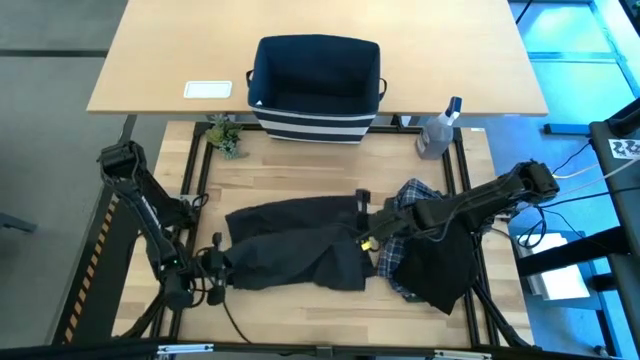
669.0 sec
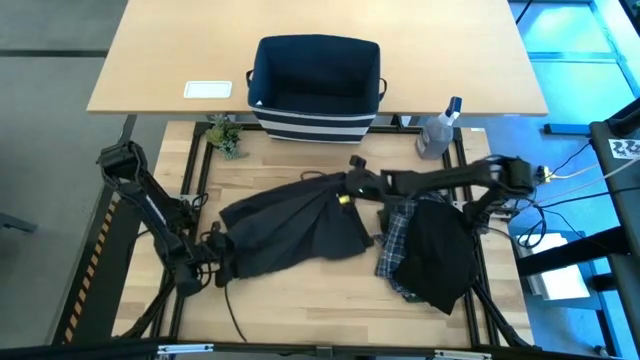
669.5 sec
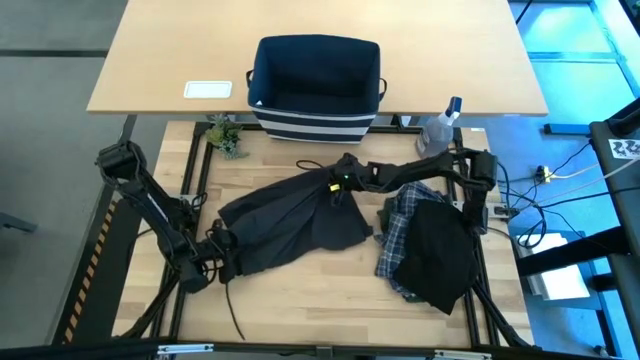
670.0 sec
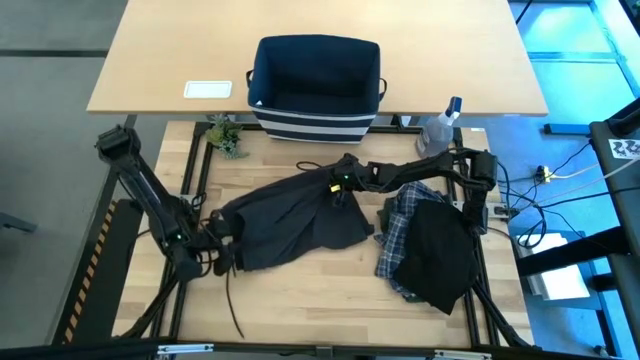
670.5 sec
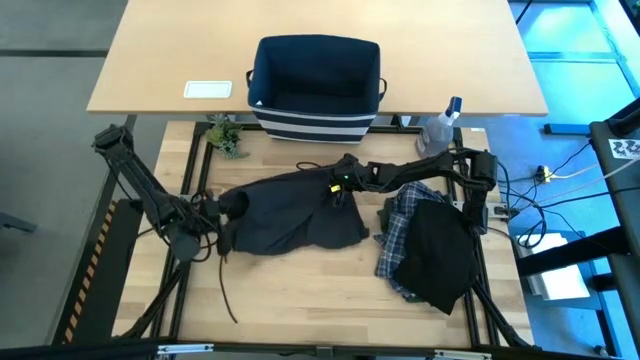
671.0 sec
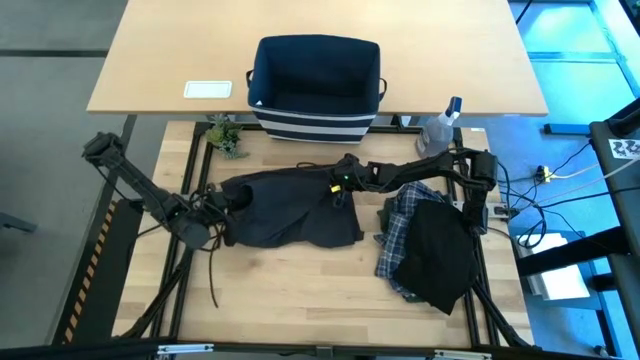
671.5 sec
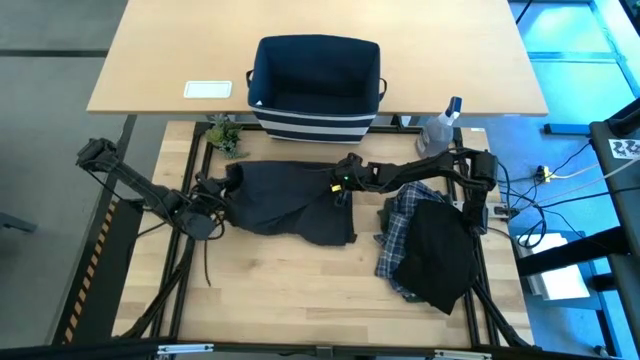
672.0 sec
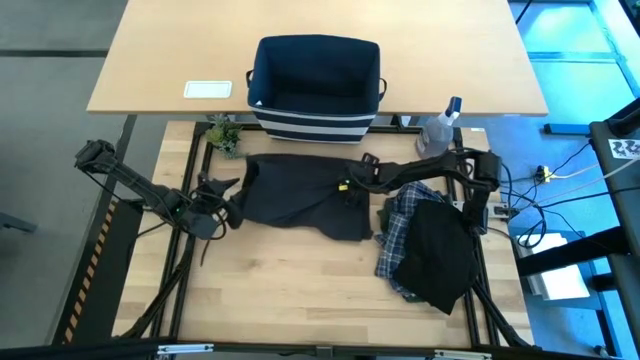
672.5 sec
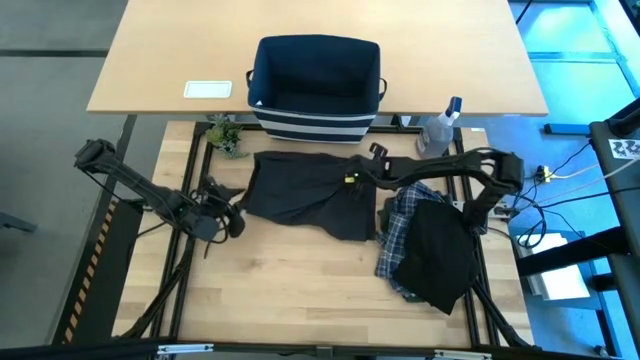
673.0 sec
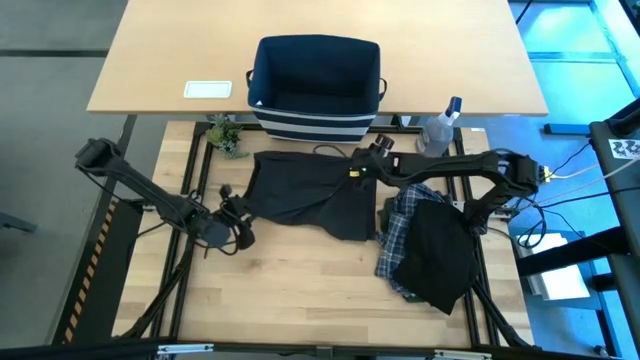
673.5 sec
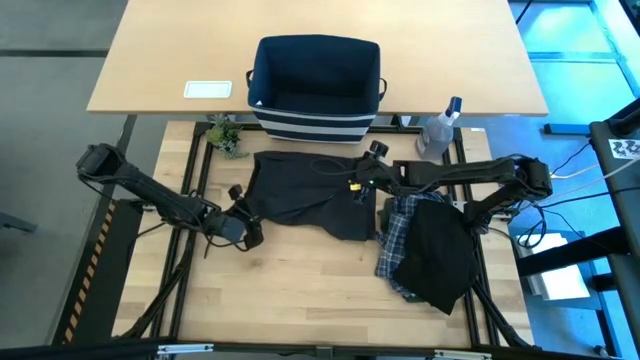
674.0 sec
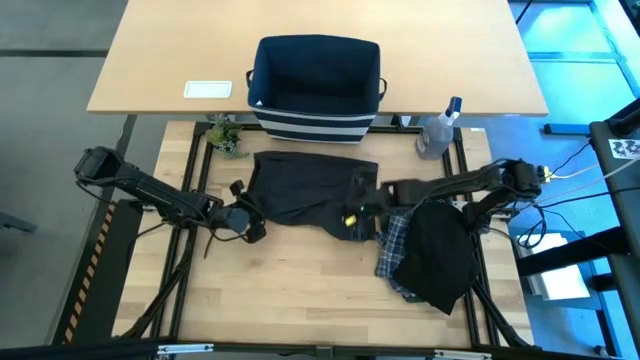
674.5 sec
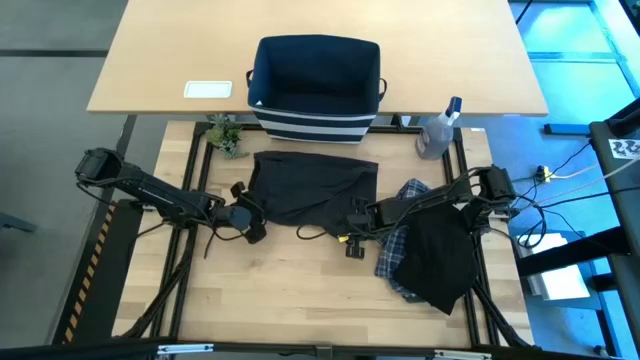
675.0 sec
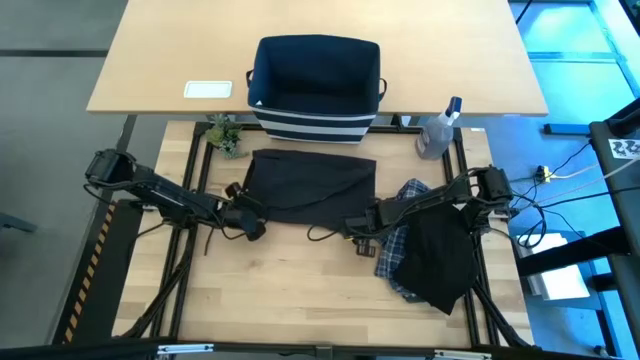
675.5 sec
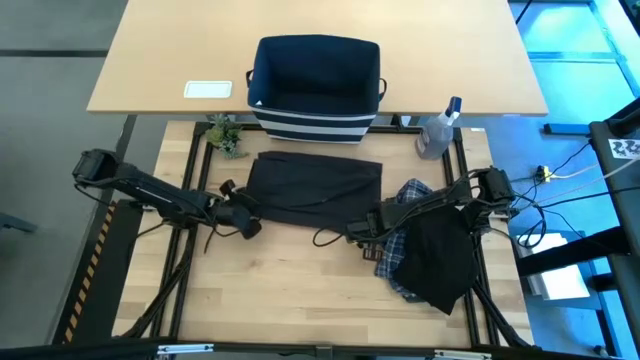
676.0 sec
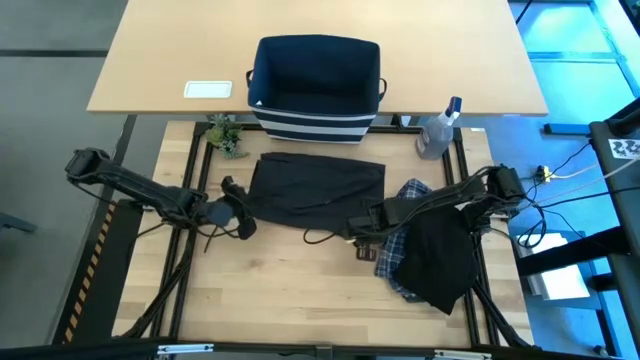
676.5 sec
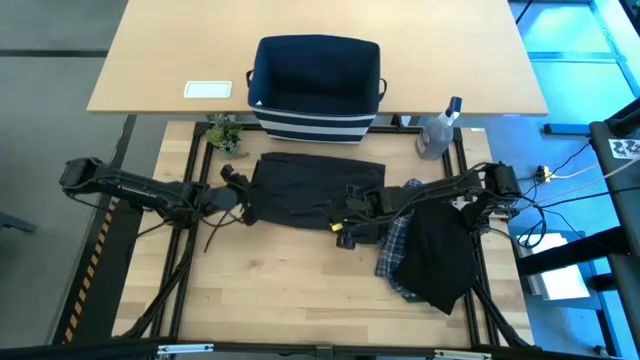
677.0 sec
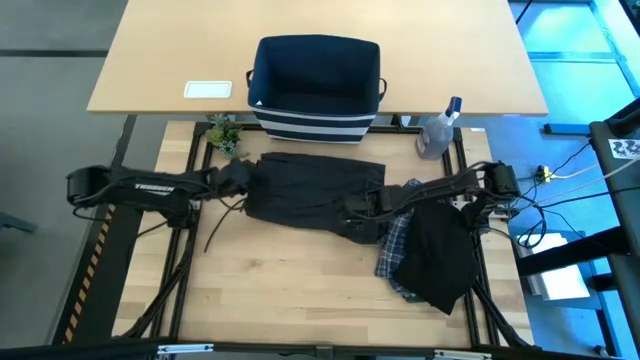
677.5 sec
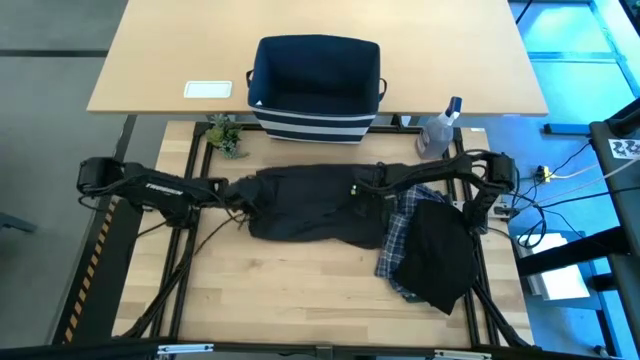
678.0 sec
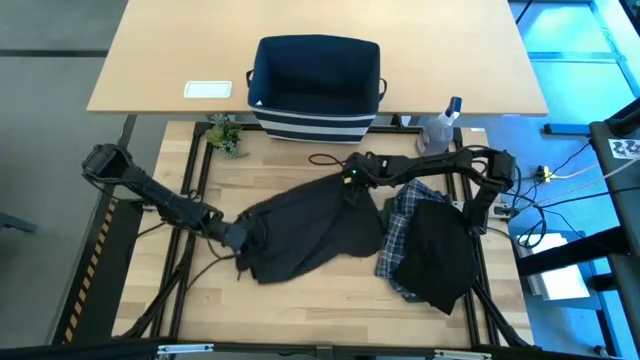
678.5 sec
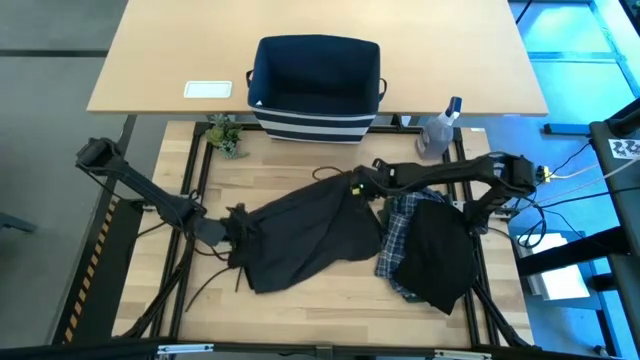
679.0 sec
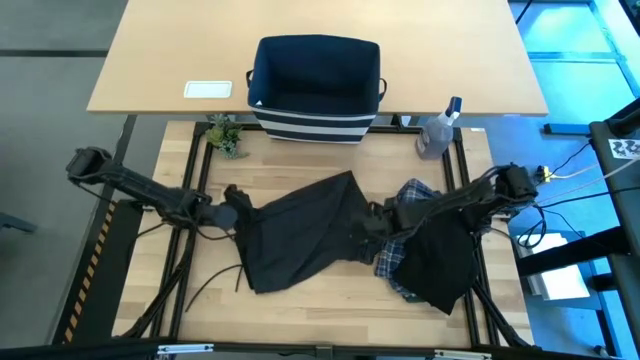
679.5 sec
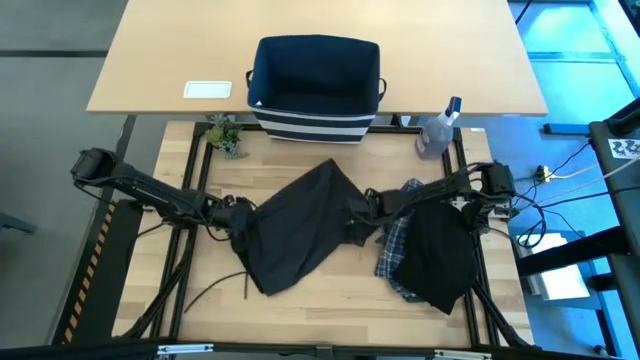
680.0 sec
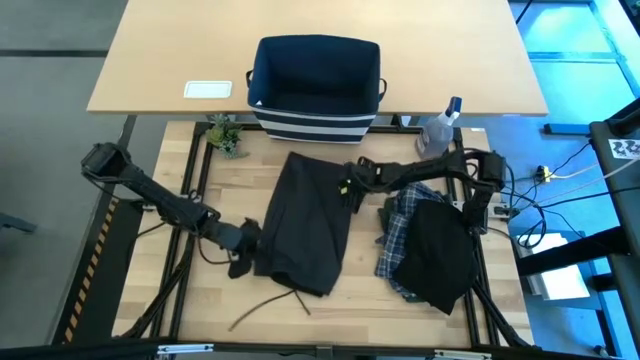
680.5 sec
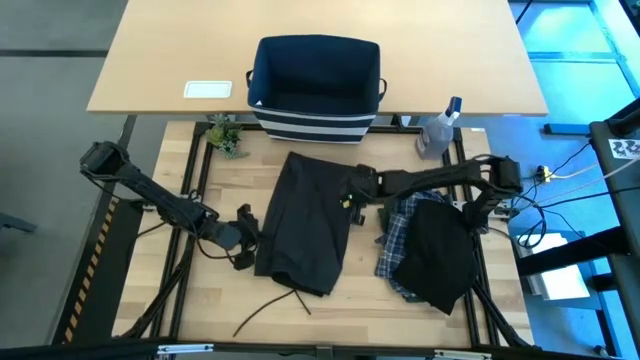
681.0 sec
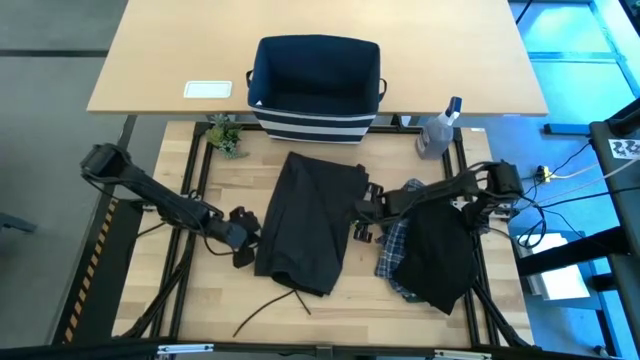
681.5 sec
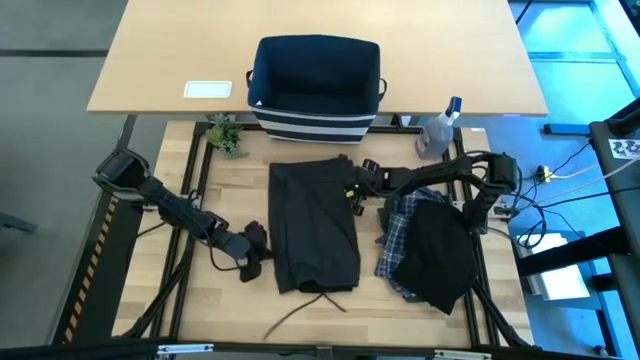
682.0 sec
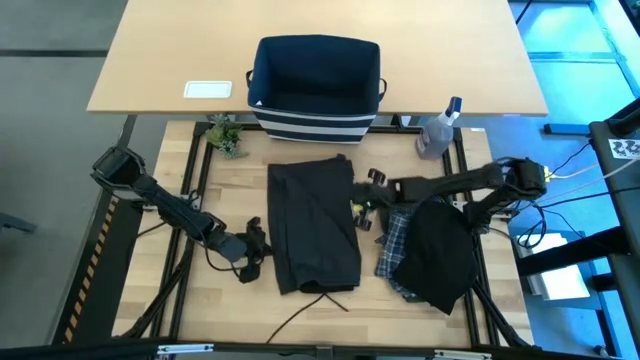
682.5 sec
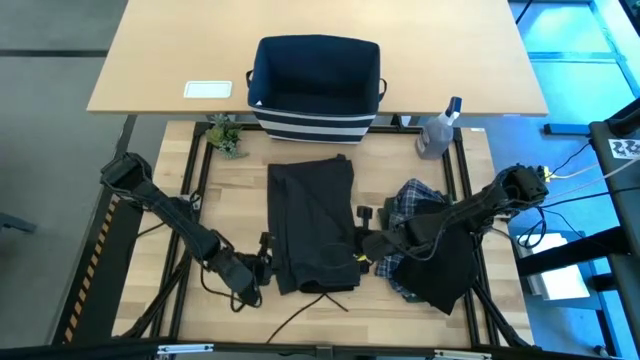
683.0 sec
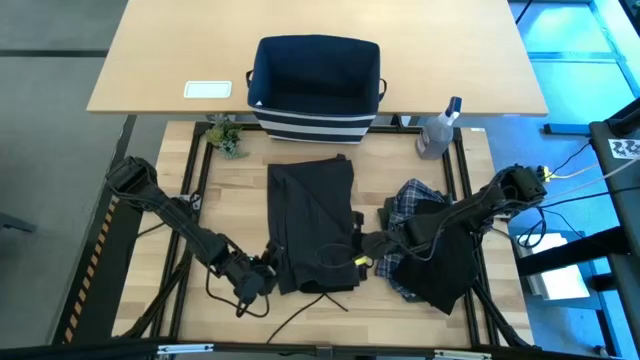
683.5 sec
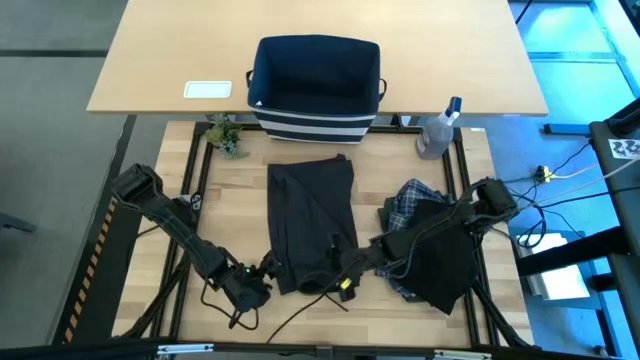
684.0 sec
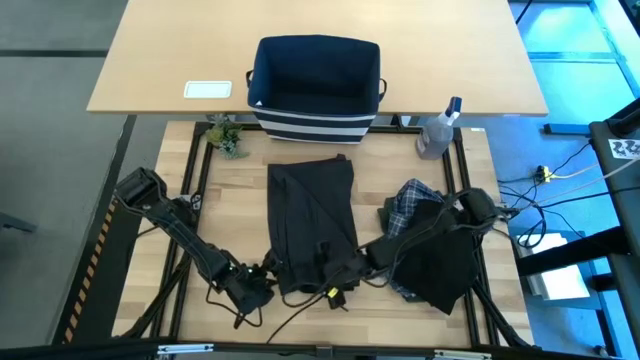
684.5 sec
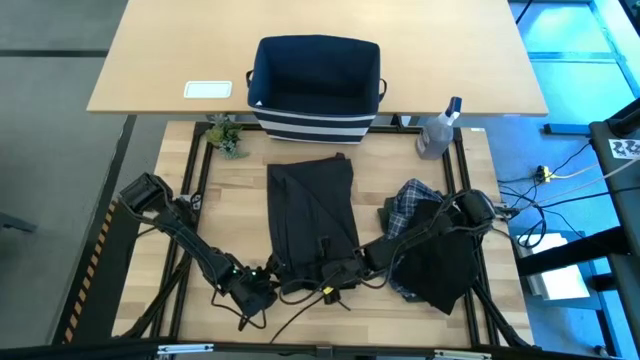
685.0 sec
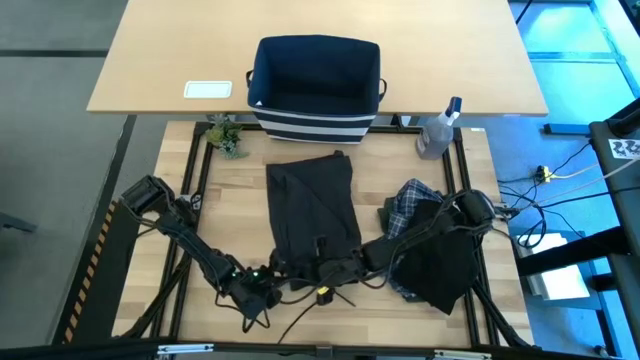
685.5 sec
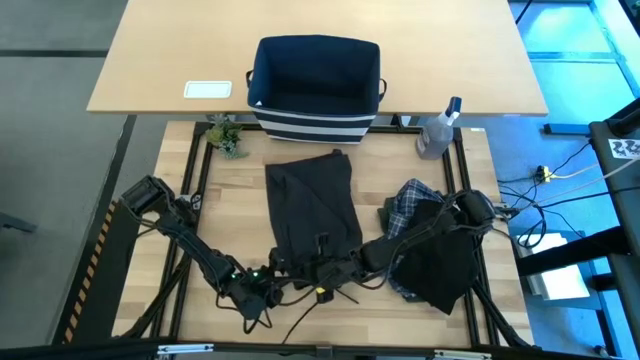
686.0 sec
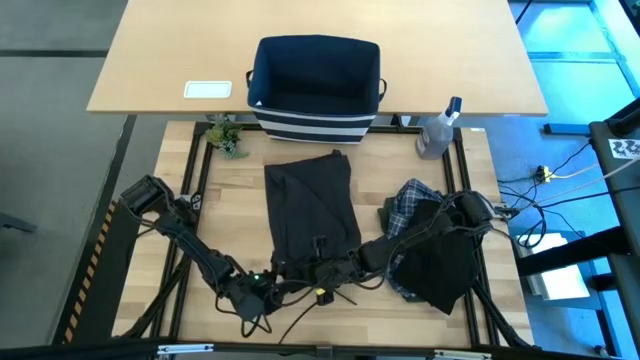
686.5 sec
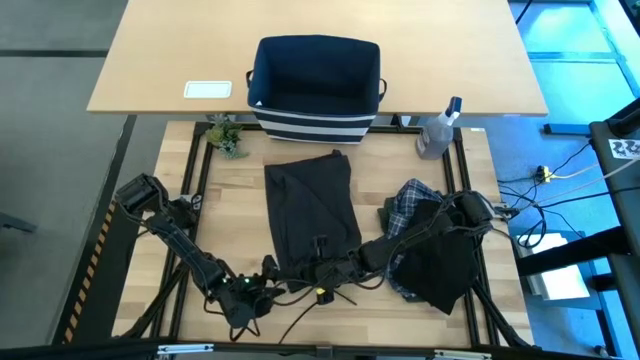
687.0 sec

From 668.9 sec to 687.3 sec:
Task: Fold Laundry from Bin
Fold the black shorts
